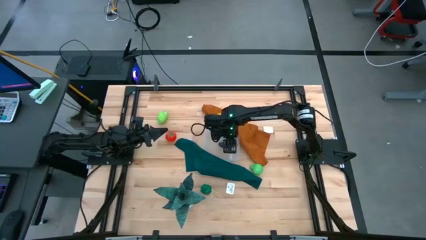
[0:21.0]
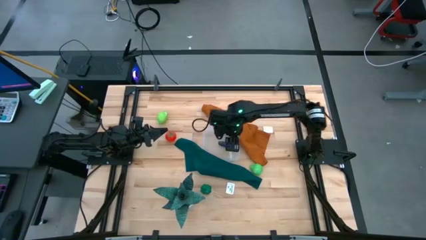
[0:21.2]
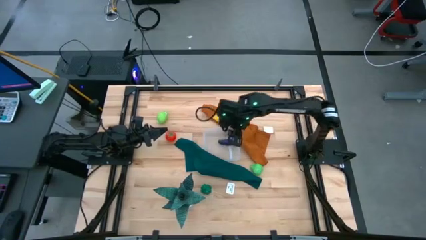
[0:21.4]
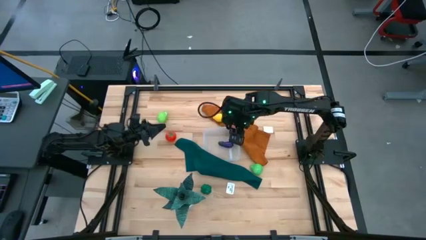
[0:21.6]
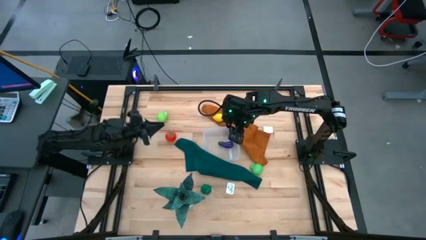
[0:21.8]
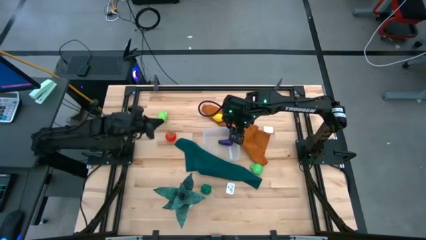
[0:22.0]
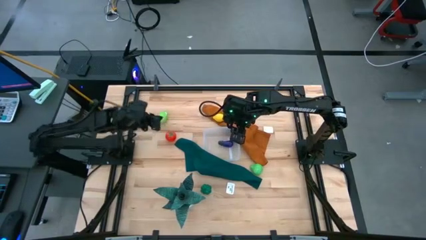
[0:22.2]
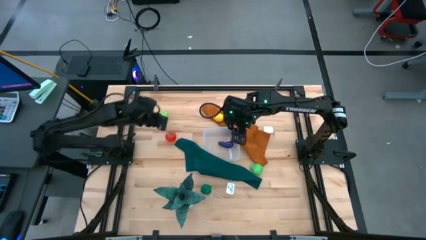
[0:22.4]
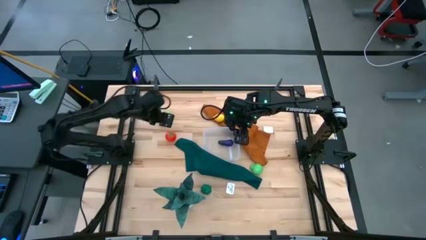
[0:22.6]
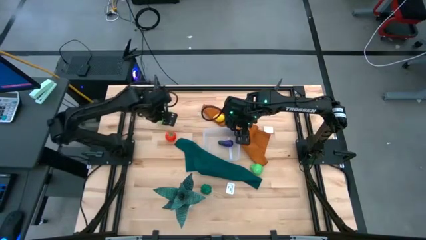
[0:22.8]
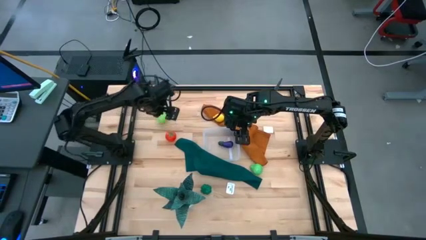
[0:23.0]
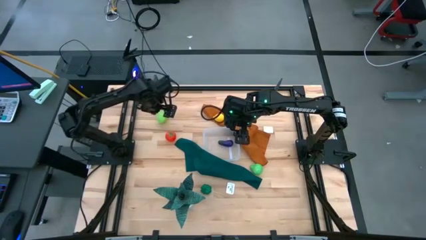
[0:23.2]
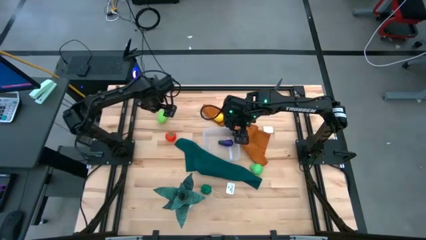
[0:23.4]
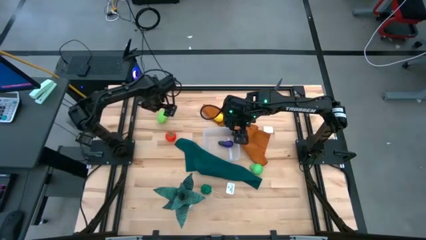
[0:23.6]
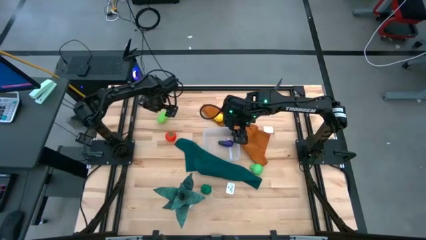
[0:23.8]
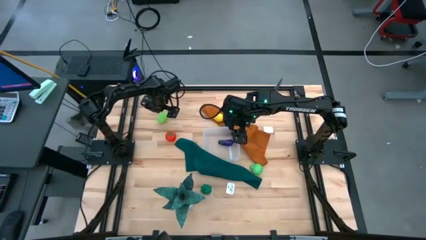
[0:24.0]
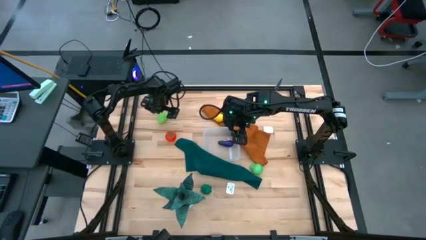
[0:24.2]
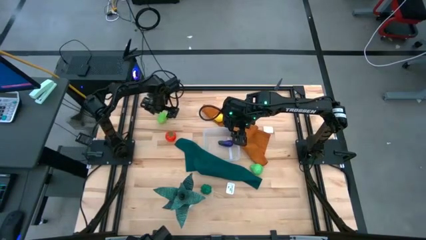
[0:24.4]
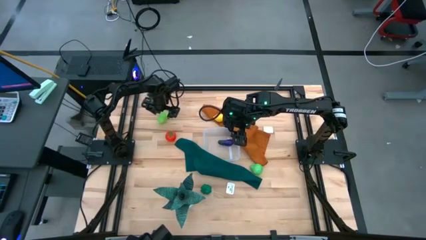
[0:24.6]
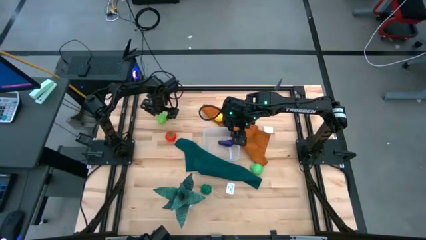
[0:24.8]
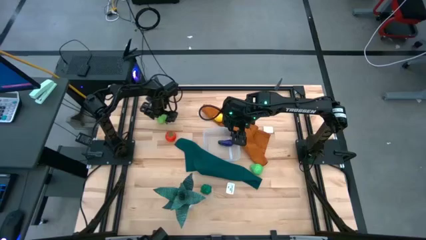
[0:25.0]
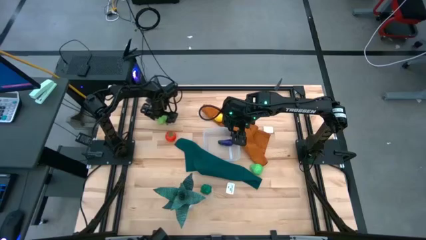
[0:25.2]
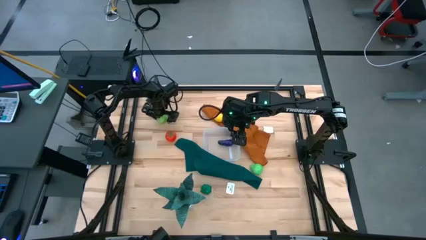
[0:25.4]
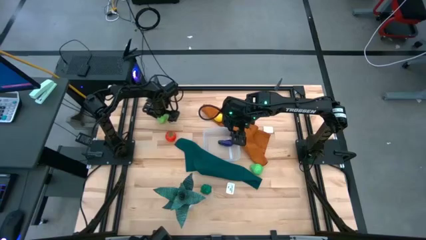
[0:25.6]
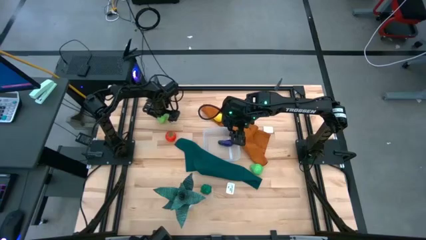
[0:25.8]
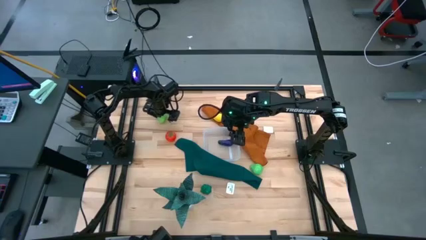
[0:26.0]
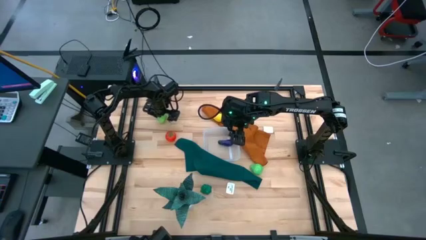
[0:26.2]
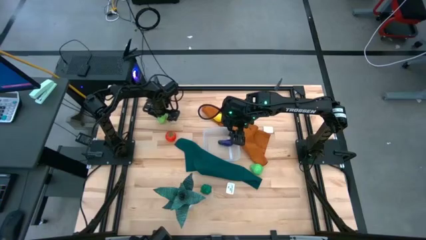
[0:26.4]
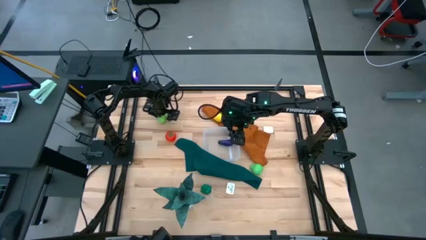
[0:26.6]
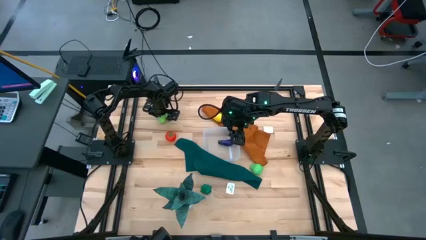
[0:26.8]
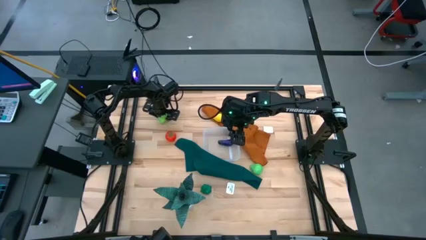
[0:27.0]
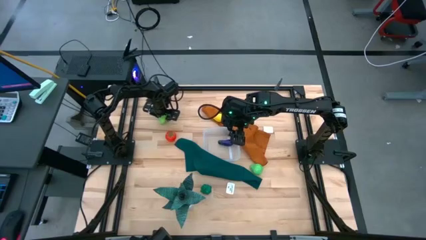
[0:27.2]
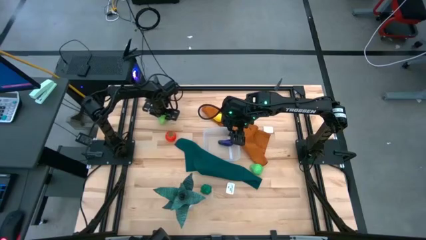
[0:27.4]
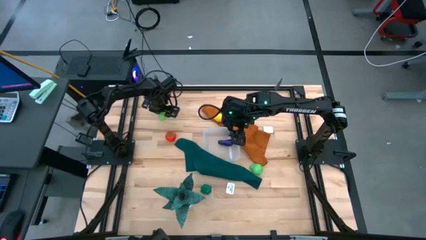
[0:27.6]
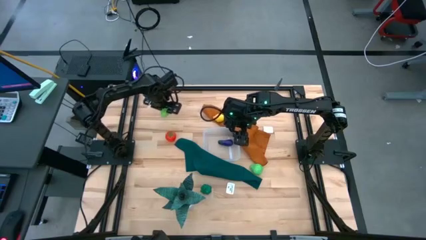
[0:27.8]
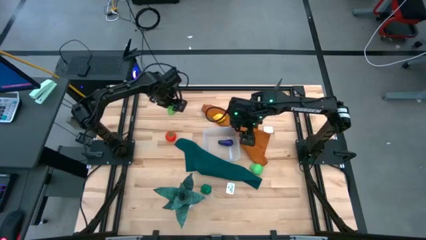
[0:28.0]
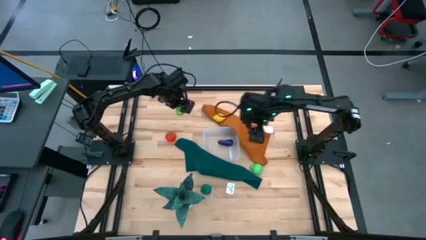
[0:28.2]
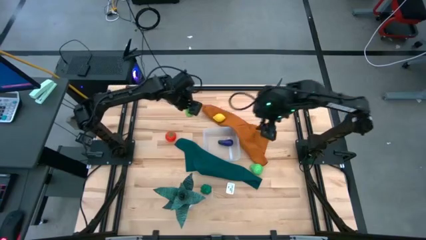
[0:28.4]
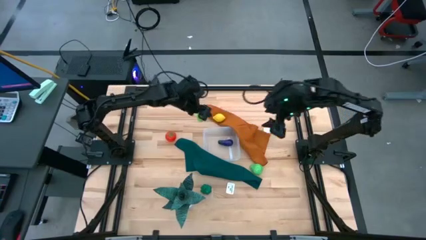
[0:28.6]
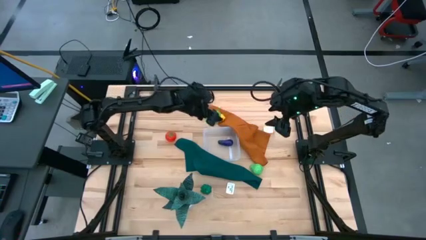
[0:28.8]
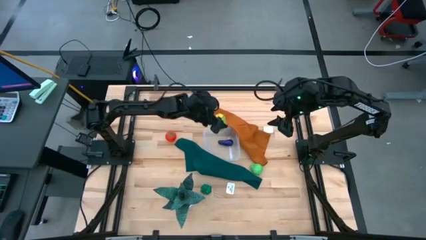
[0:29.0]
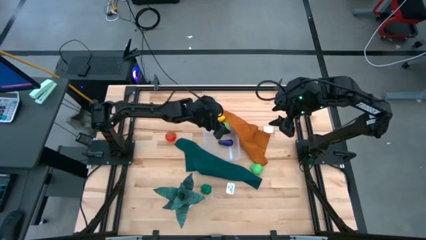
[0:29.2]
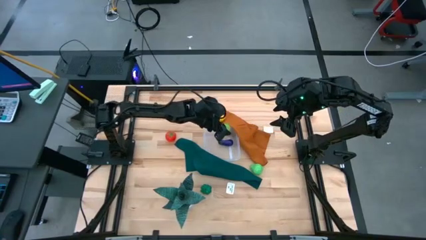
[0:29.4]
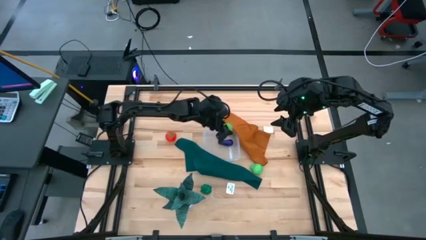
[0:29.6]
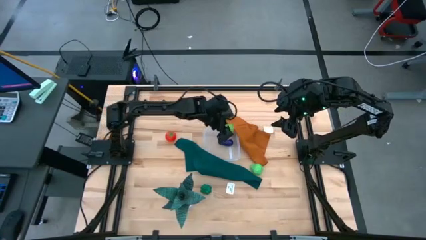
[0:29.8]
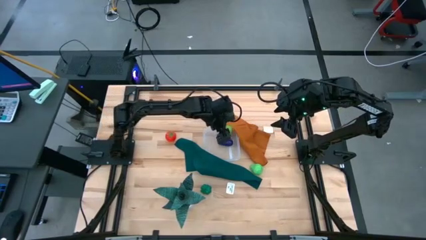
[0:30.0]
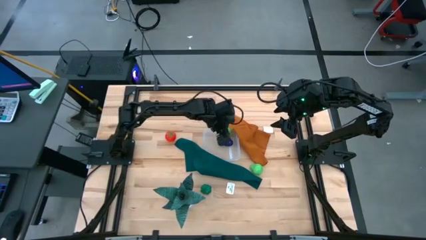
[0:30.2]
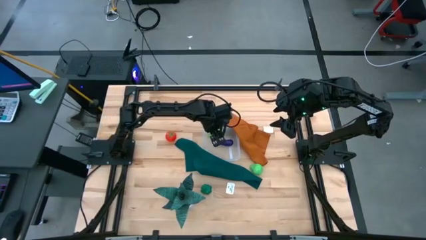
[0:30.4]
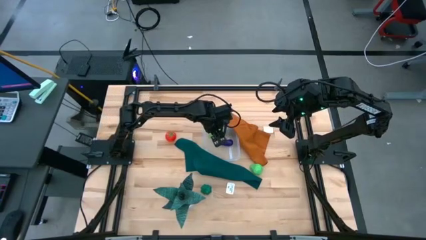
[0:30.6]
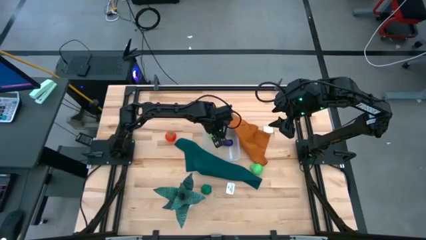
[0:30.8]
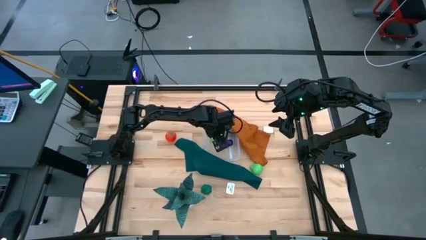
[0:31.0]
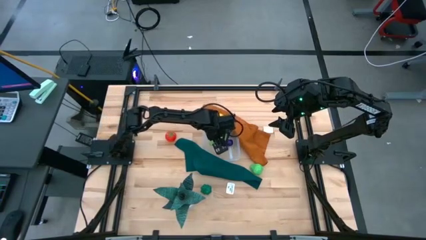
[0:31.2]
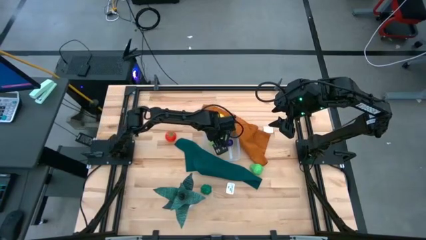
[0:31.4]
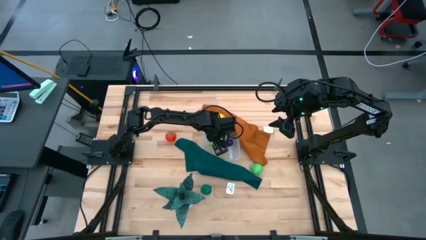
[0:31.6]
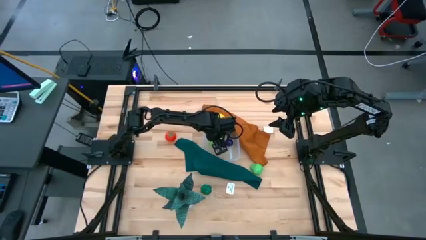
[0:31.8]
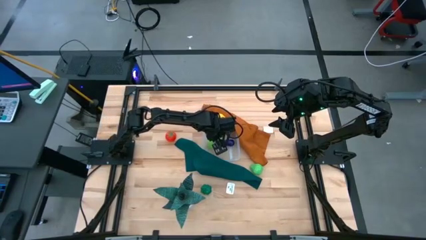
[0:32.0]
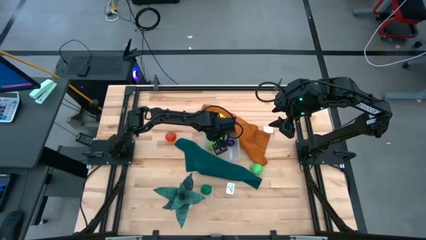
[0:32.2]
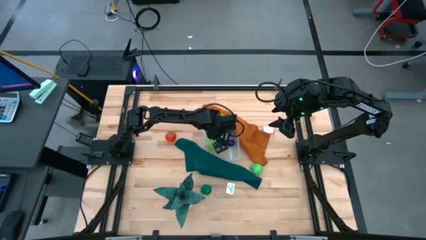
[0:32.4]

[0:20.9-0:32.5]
Task: Pick and placing Produce into tupperware
Put the green melon into the transparent bin
